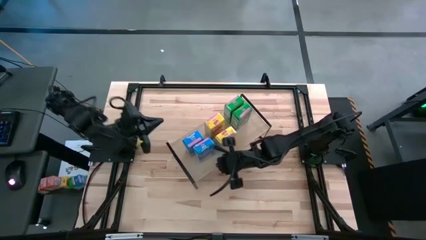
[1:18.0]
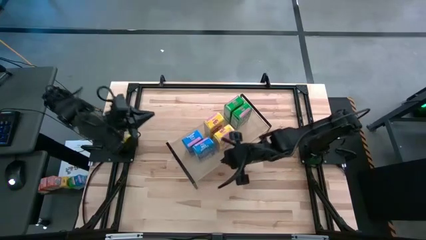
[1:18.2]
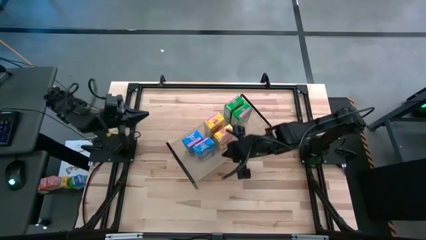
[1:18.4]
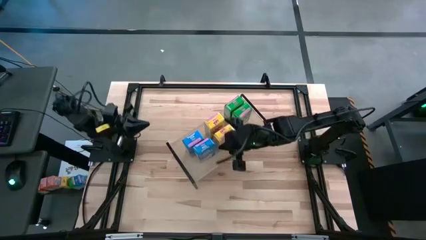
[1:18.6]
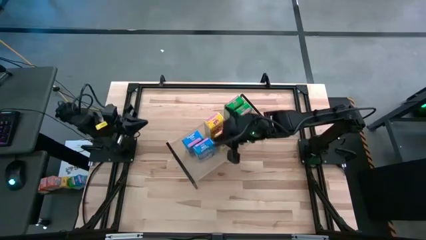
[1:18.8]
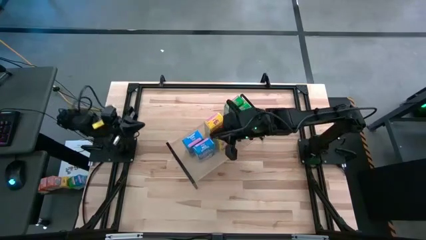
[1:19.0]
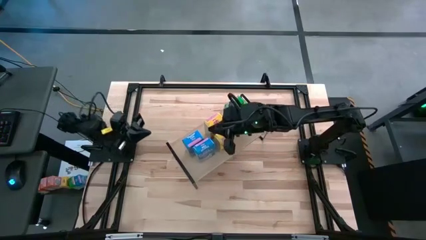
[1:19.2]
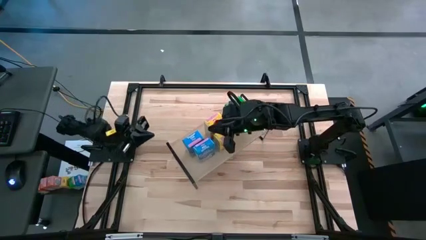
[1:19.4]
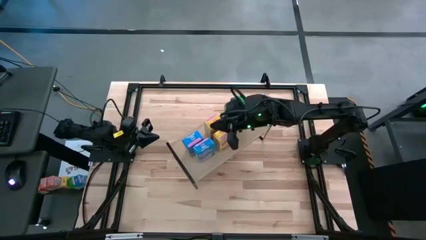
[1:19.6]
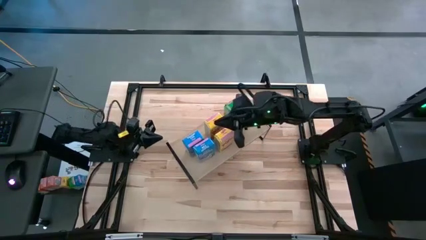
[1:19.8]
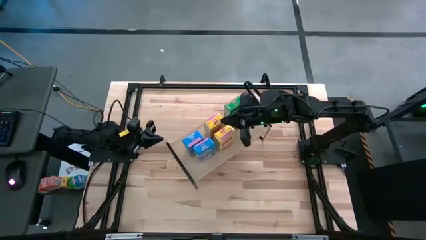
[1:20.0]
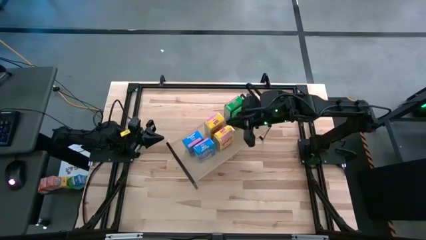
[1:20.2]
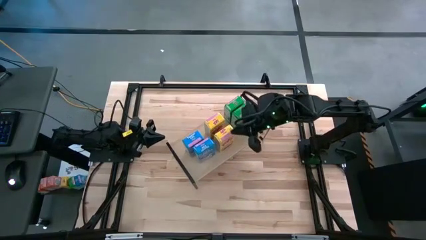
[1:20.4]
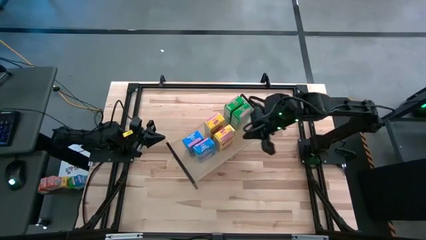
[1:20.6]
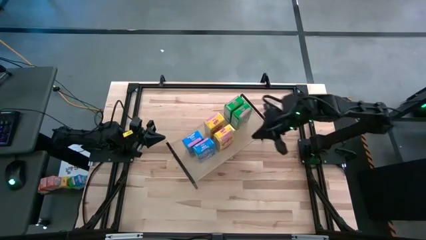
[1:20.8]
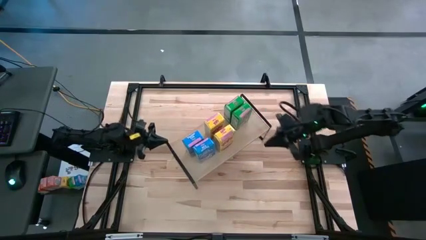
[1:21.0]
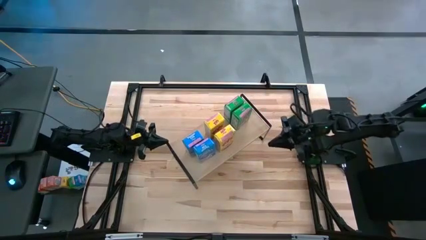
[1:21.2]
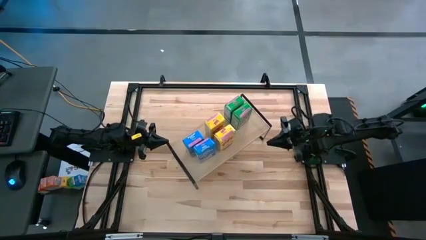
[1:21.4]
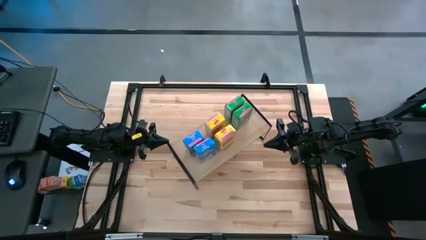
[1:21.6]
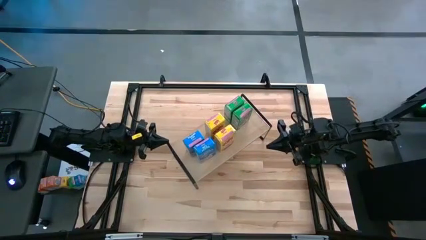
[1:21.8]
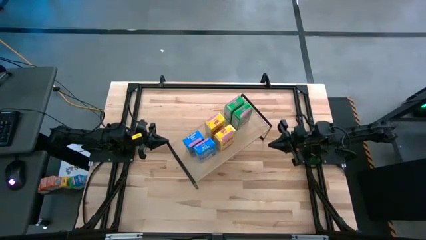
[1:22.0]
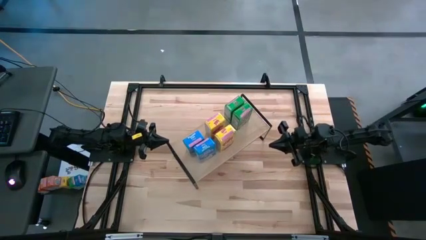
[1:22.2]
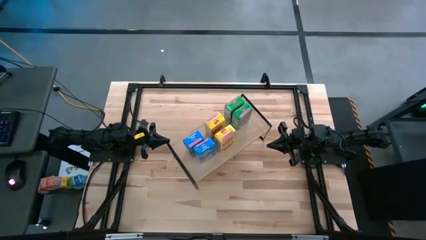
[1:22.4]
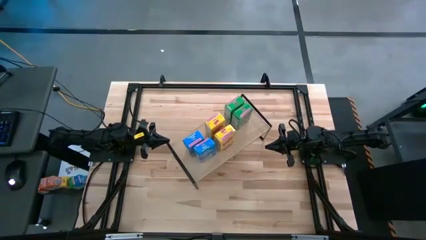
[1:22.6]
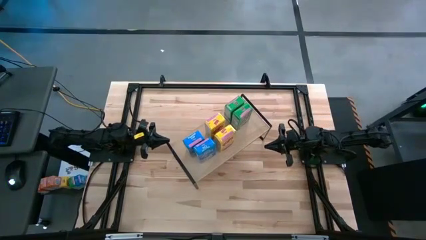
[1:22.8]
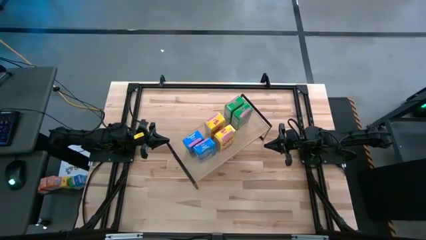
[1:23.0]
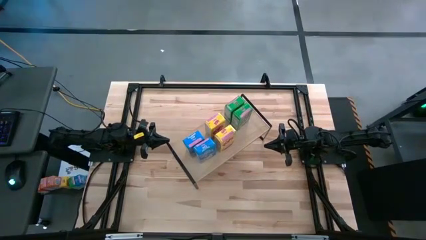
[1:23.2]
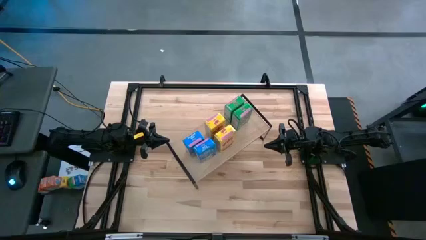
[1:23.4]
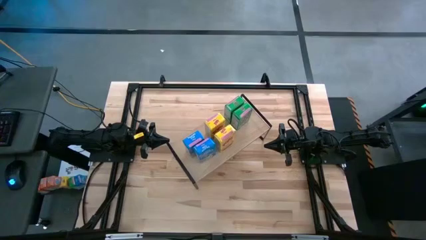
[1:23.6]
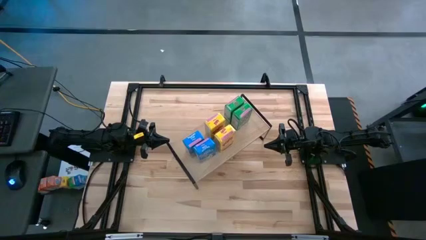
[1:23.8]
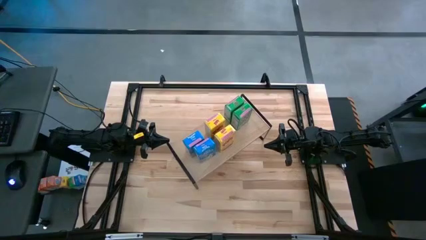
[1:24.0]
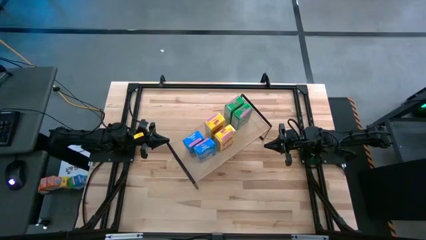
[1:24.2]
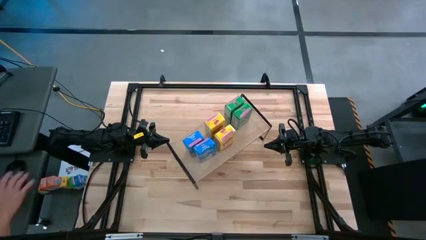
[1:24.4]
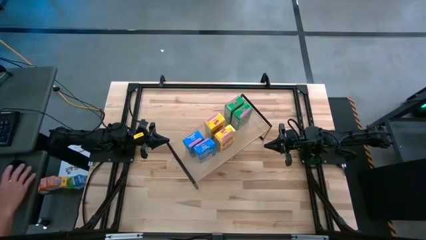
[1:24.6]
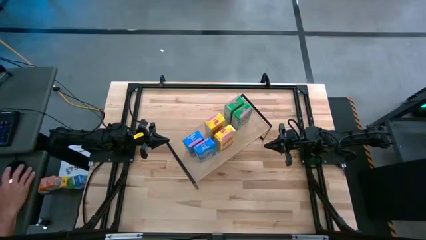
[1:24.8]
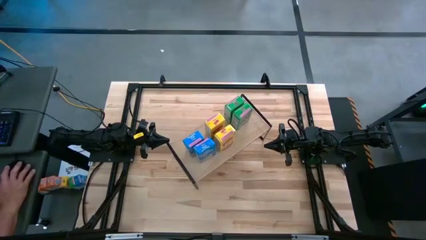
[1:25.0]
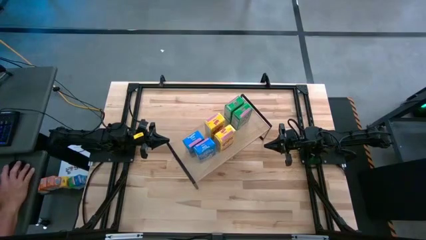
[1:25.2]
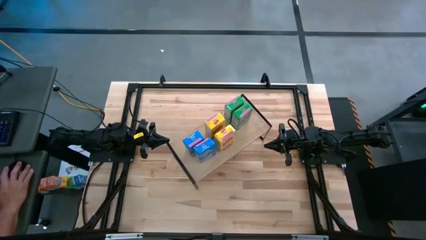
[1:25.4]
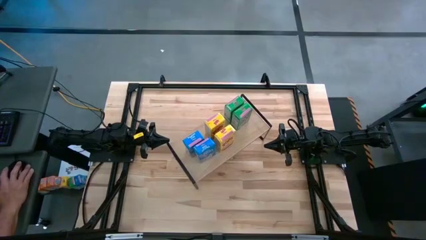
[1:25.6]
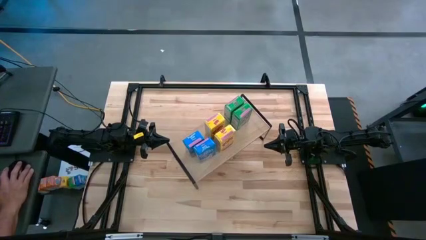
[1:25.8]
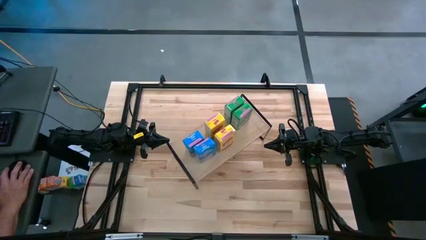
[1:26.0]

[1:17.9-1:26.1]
Task: Stack cereal on shelf
Return to Home Position

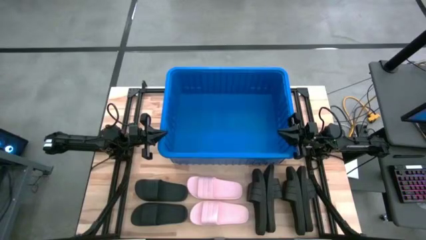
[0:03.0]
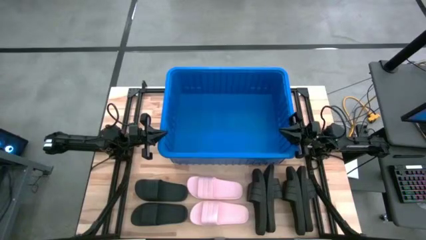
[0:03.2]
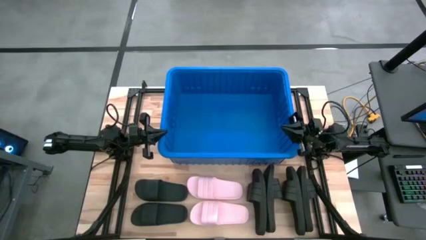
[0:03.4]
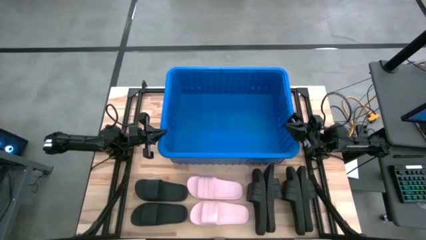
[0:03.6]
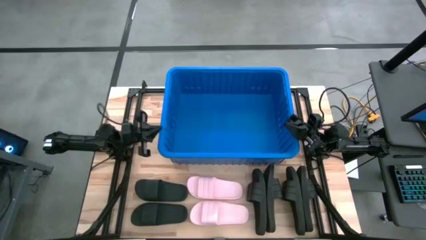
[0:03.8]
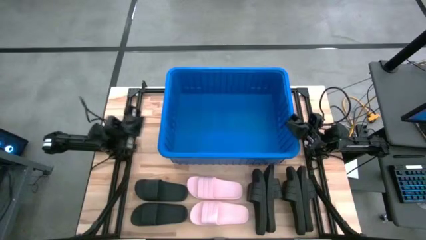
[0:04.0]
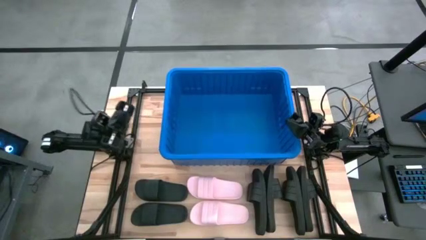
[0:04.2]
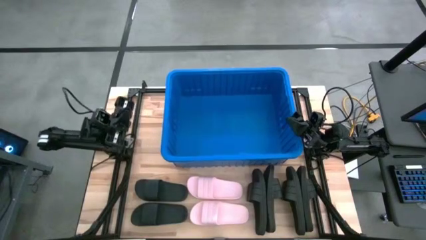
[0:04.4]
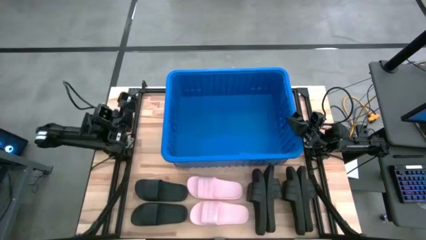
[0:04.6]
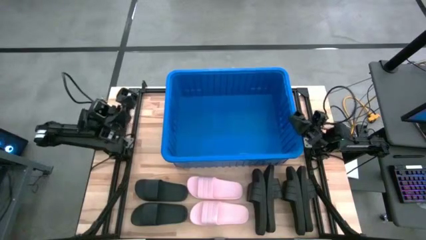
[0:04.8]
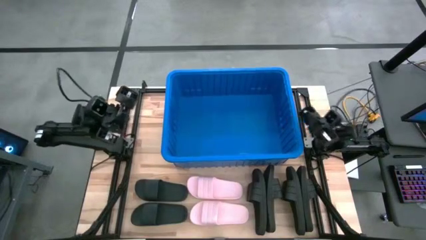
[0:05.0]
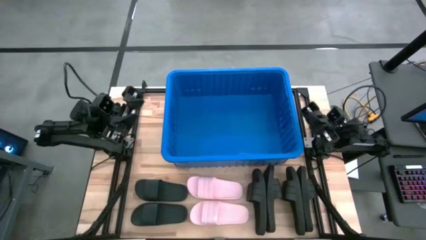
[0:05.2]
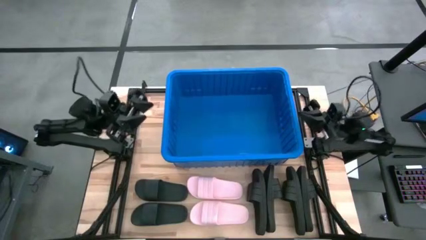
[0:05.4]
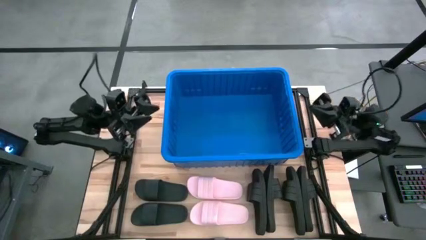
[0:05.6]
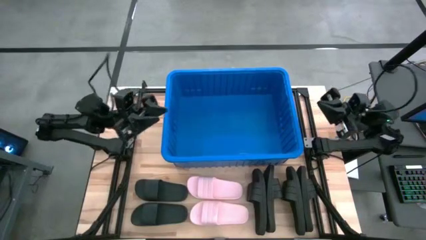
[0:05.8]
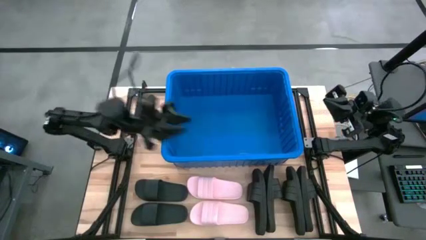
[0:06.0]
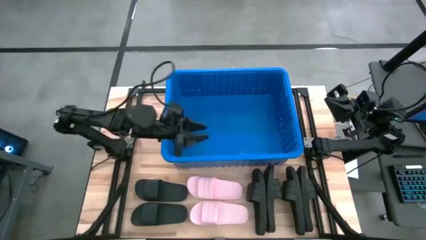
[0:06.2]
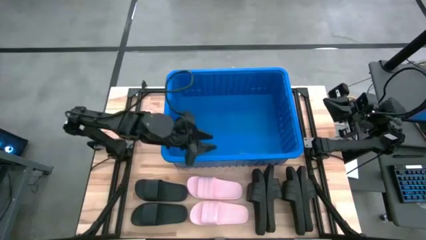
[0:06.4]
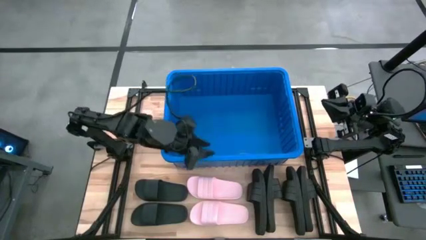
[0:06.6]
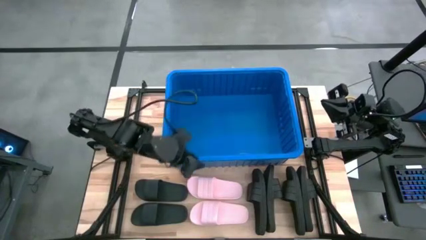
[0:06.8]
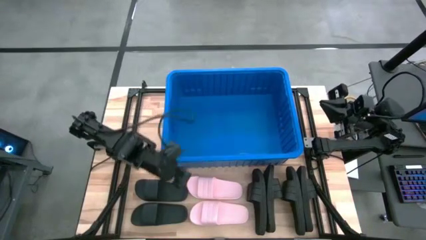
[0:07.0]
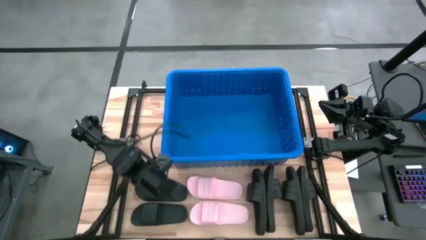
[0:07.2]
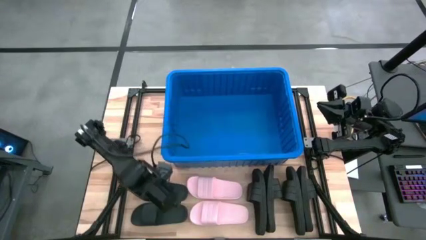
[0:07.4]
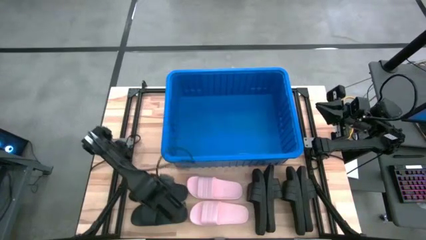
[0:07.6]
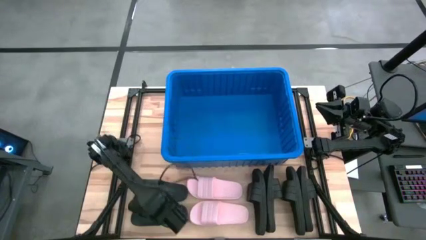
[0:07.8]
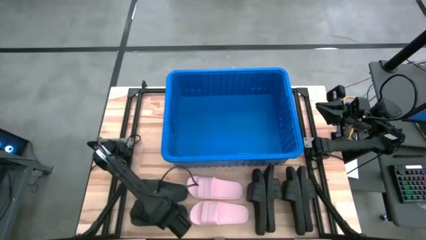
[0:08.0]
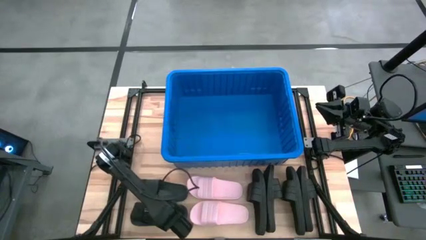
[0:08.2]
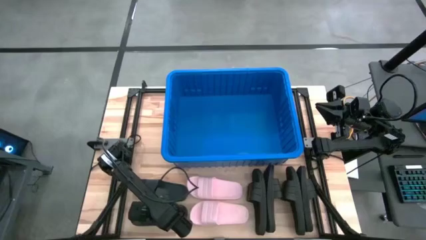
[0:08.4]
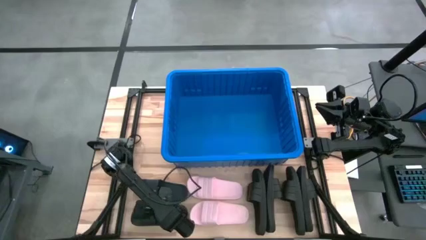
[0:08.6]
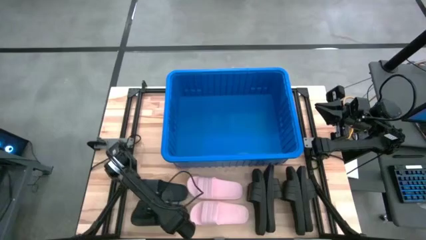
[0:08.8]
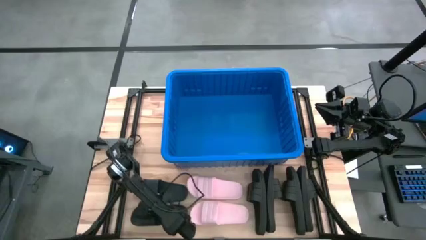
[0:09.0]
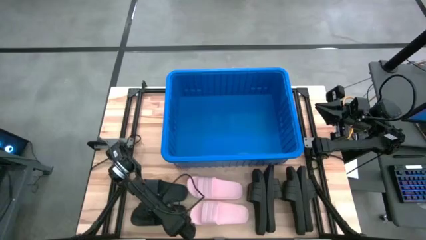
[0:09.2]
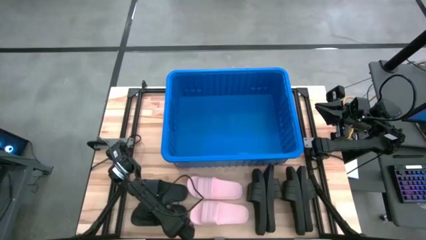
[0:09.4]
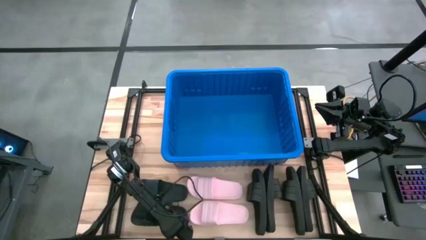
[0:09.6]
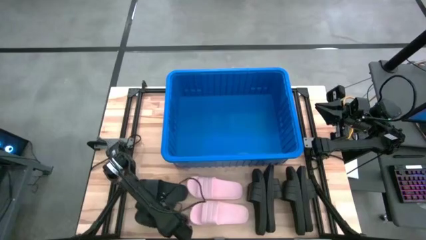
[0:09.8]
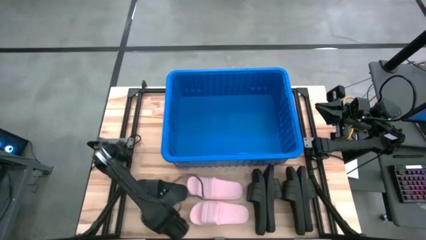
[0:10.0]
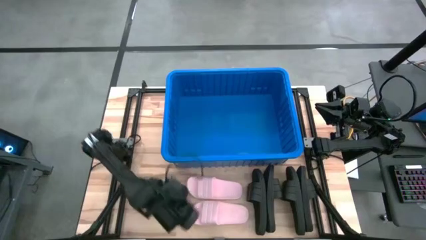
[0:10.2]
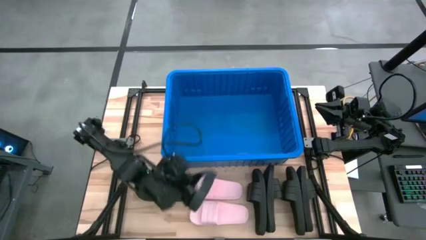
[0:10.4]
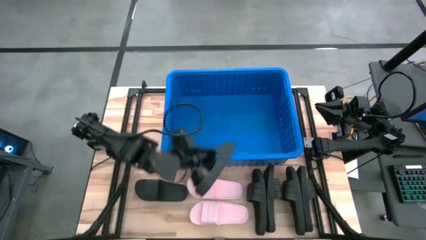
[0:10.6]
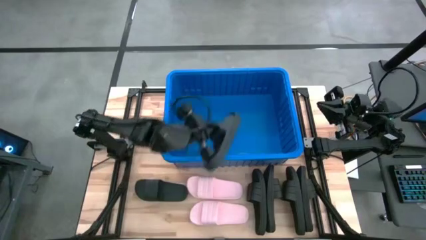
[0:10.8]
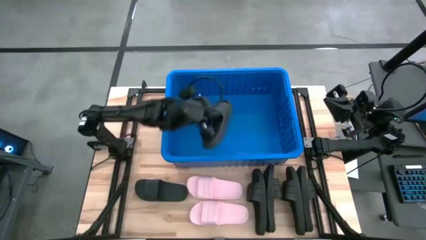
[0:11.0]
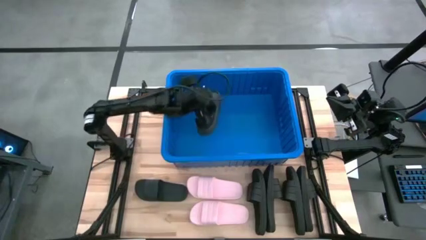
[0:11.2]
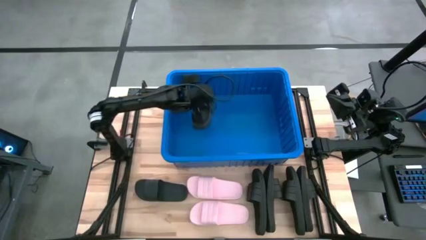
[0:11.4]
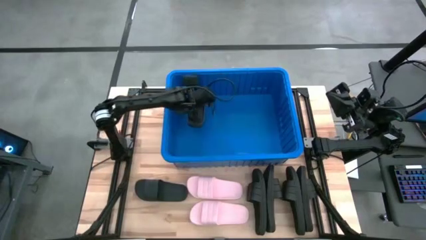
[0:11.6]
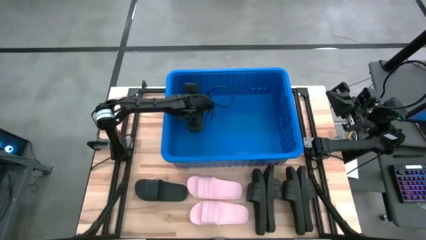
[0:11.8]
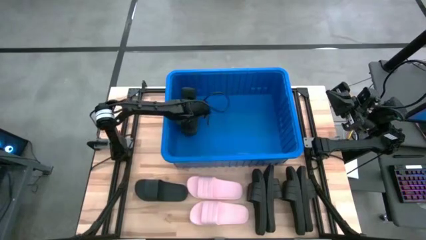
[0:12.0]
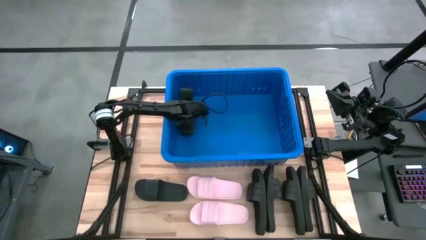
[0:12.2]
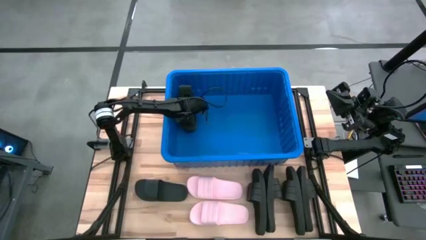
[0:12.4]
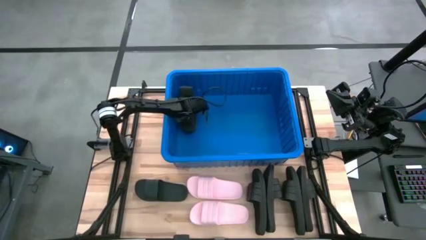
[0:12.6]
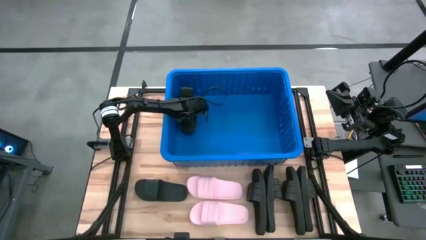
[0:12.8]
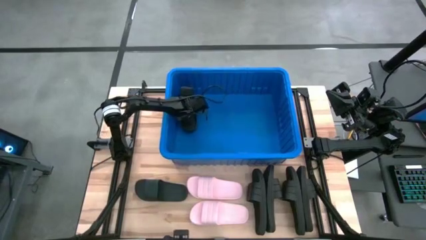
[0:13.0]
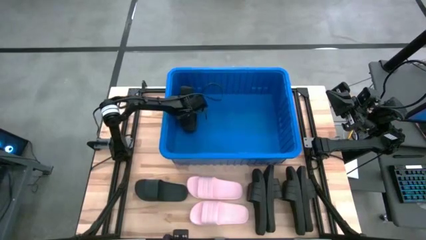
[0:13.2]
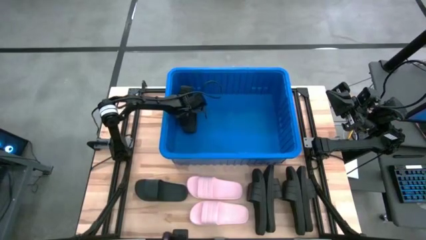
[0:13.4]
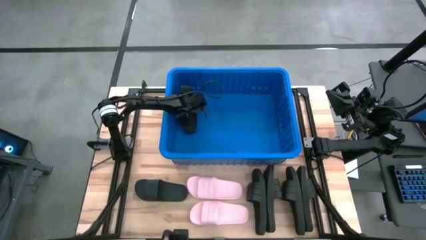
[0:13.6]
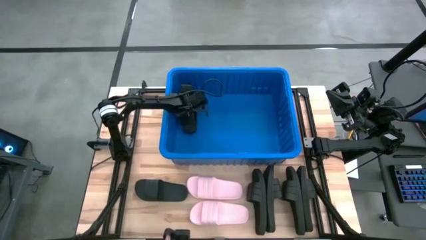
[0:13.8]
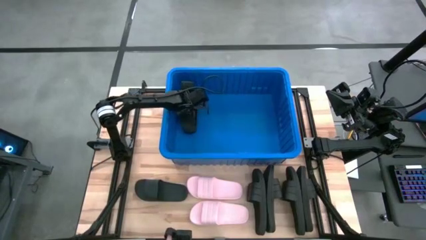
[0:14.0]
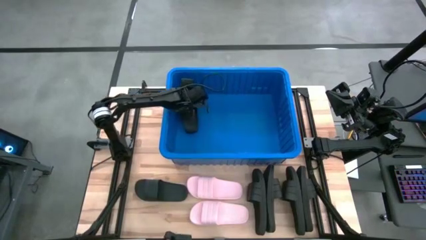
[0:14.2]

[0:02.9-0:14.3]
Task: Pick and place slides into bin
Put the black slide into the blue container
